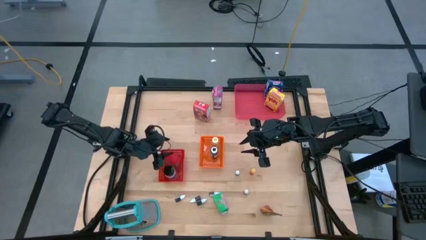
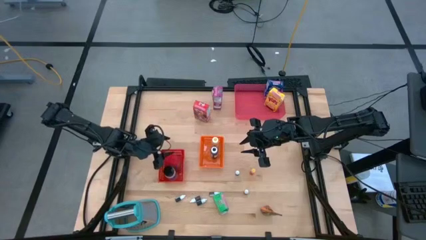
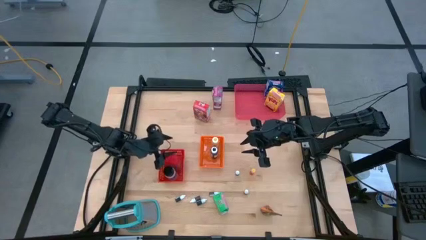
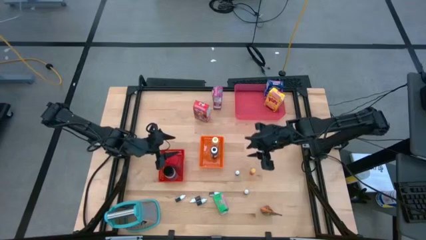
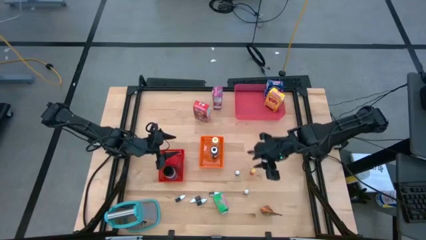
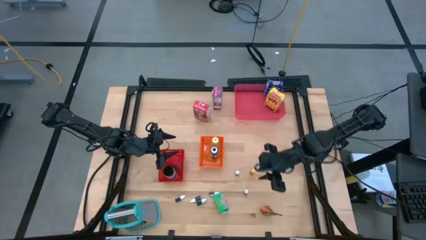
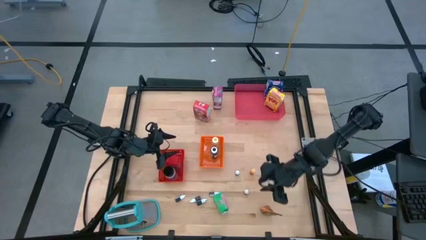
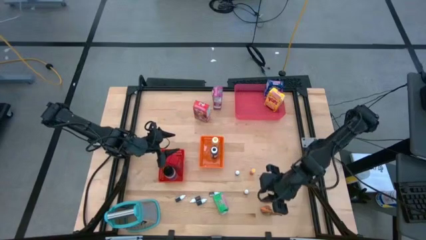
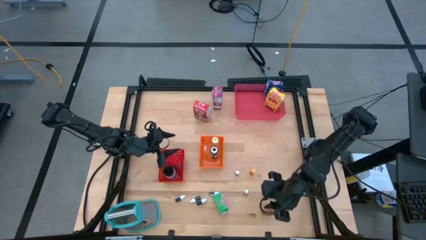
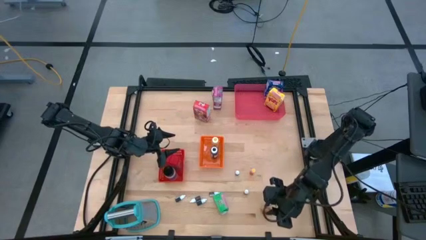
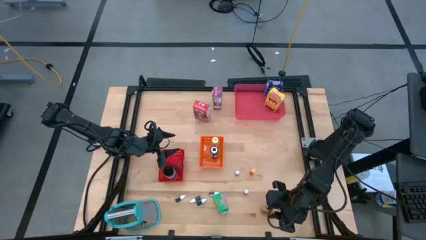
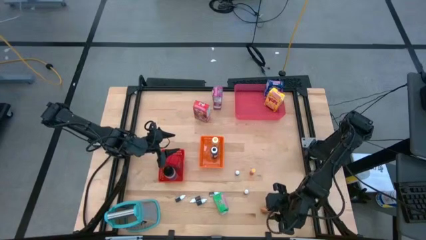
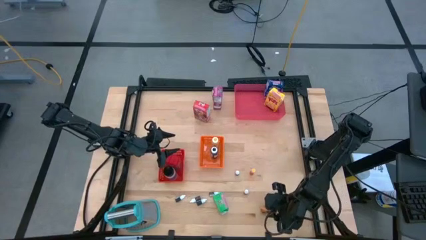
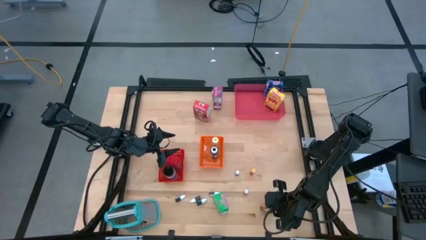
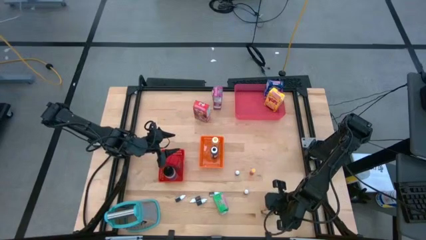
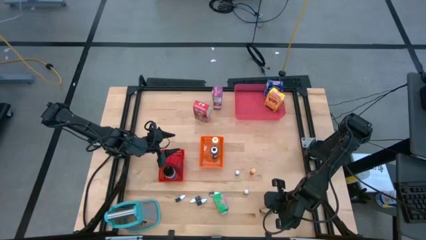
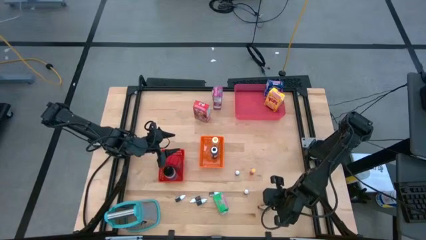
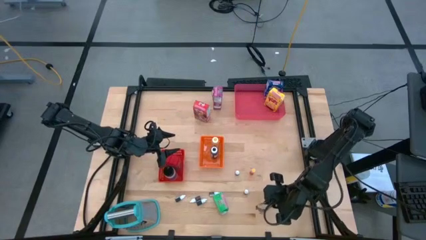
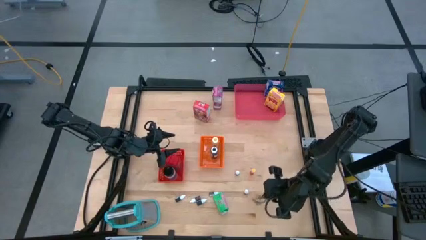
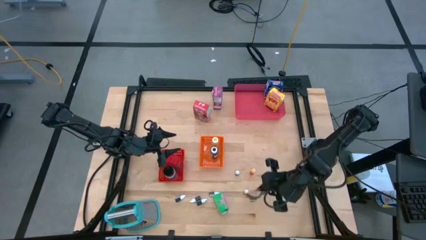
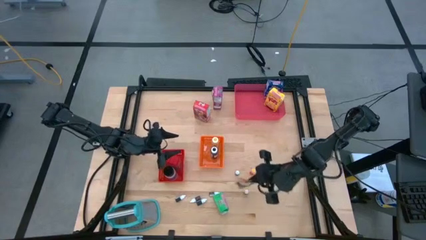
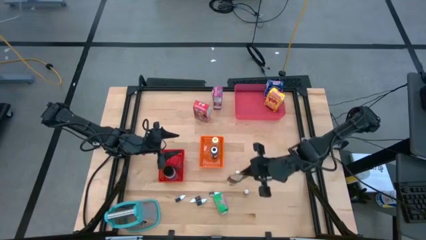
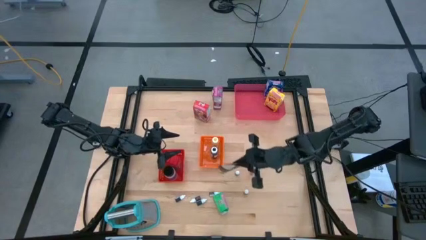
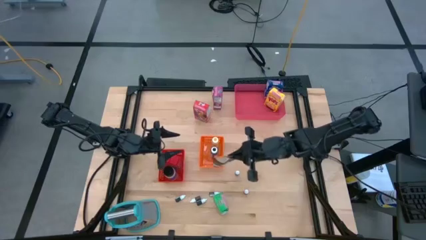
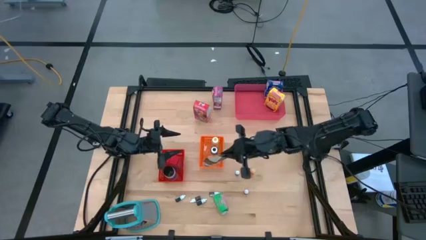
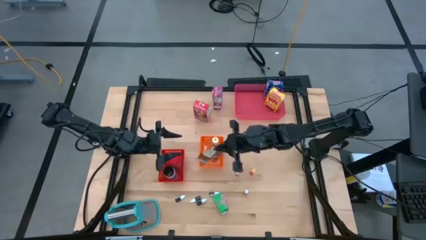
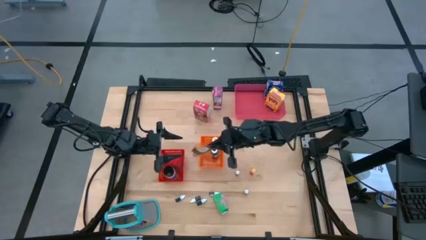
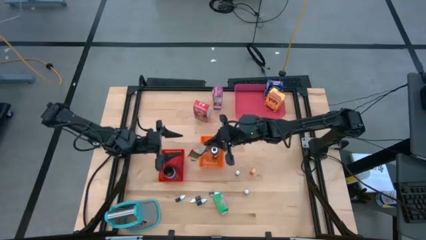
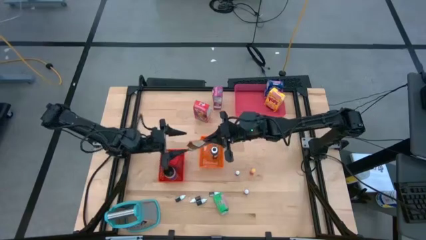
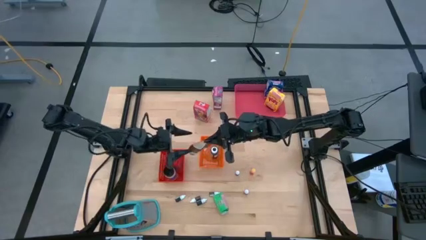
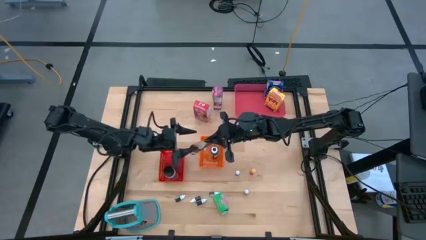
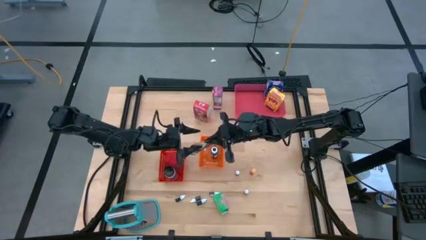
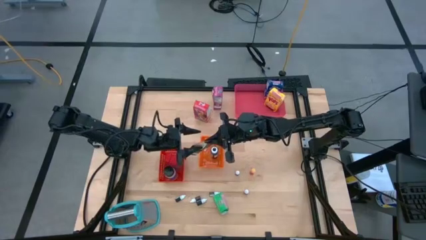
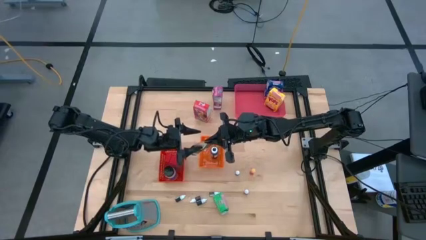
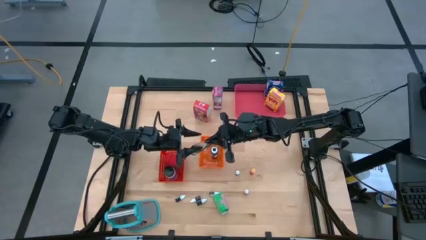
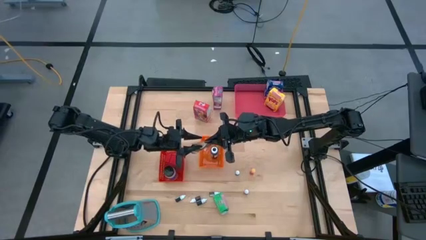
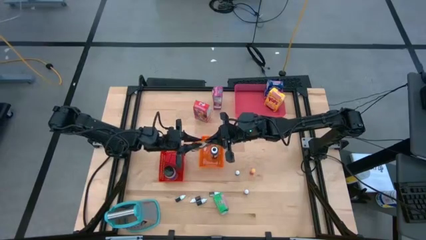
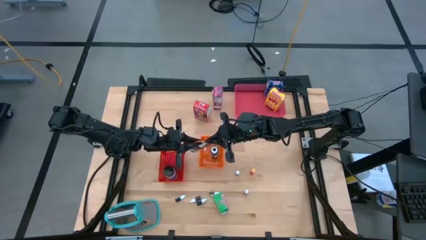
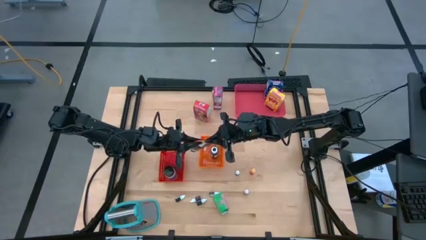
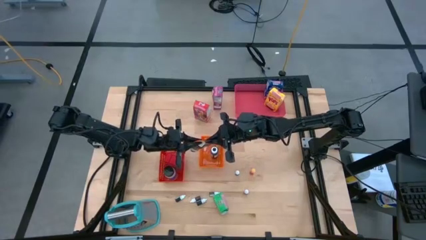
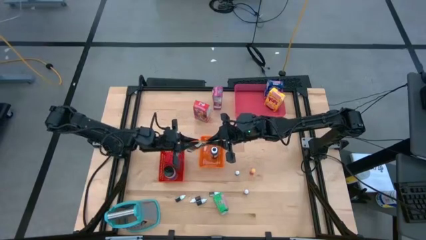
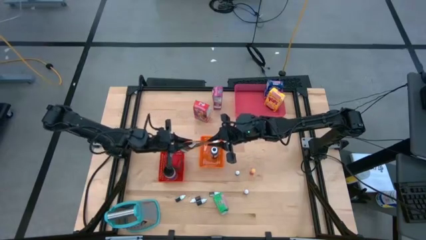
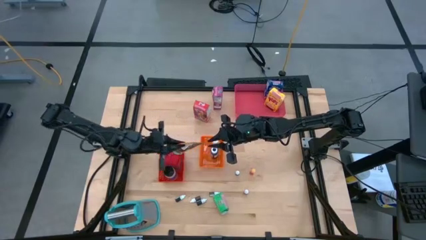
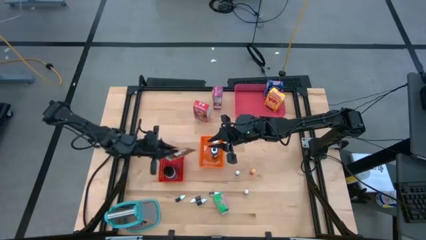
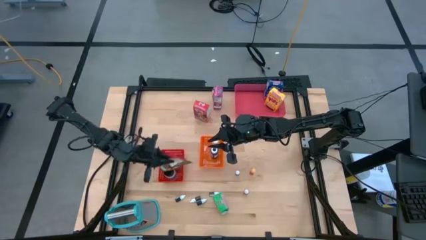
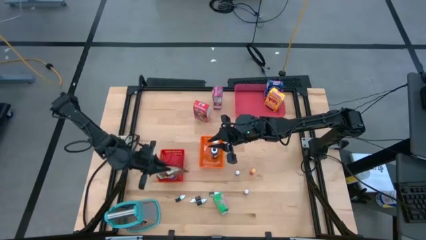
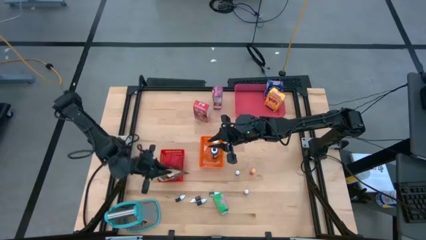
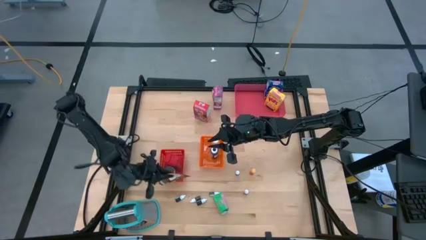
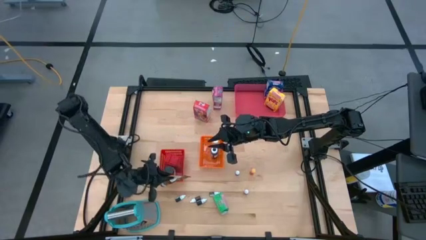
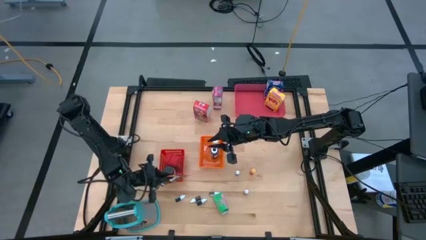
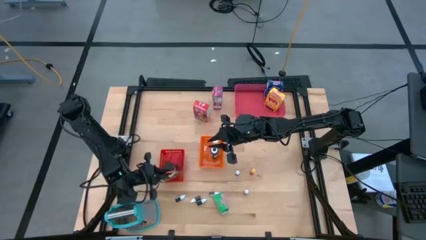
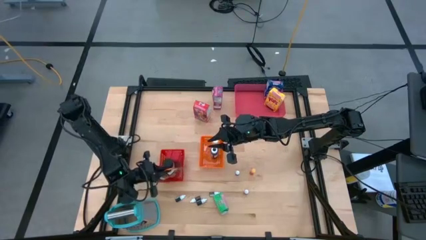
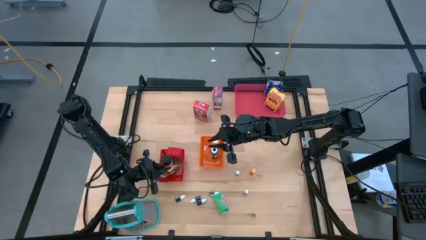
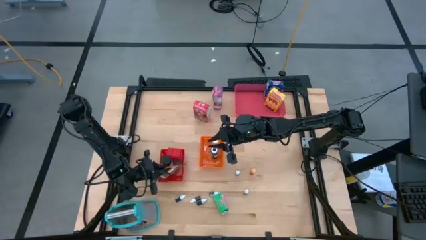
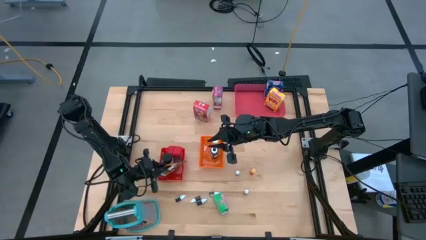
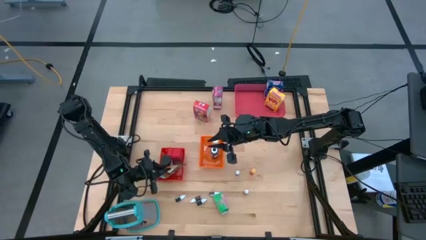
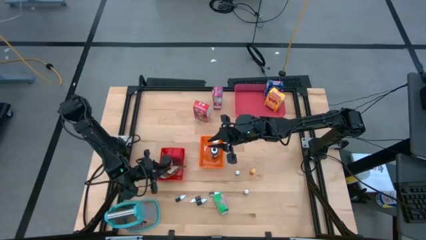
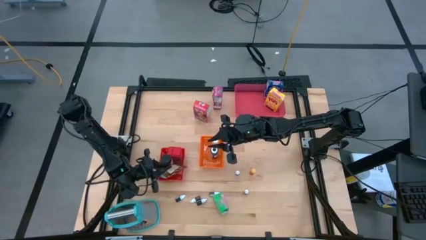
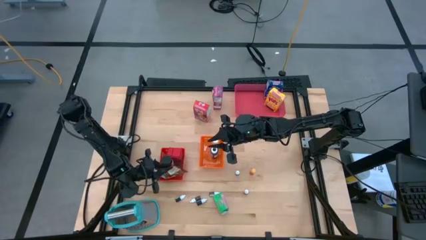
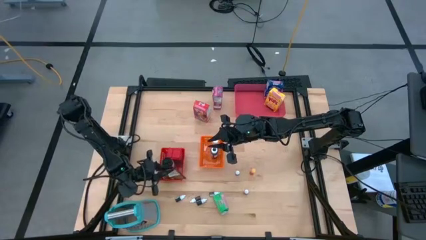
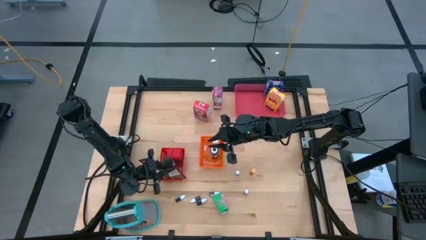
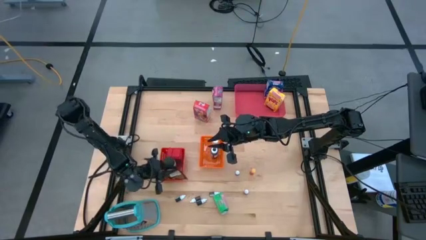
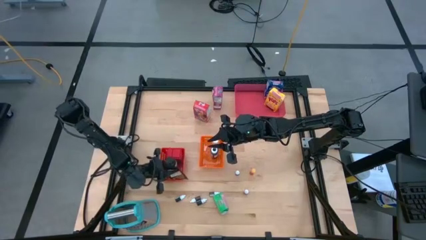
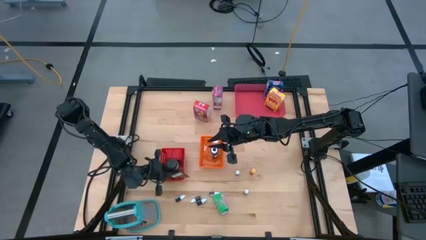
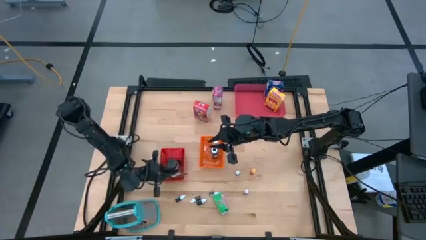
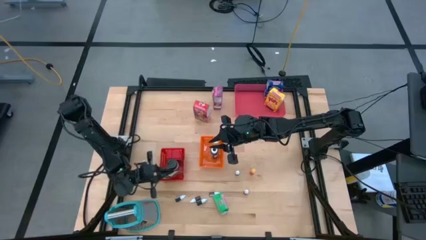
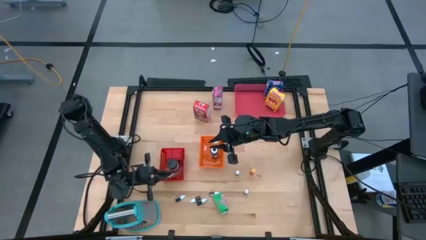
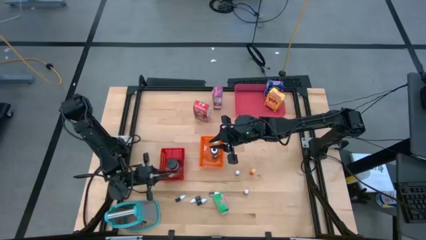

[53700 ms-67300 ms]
Task: Pick & Place Kitchen Items
Put the orange seasoning pack into the red bin
